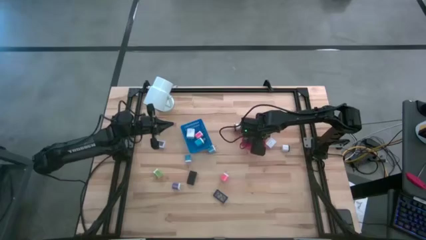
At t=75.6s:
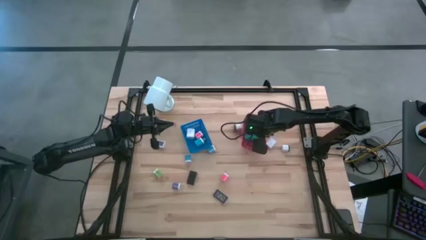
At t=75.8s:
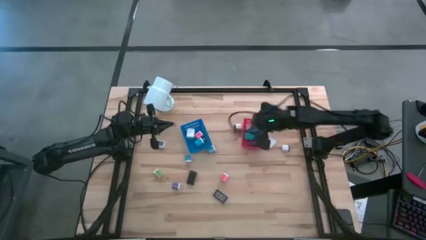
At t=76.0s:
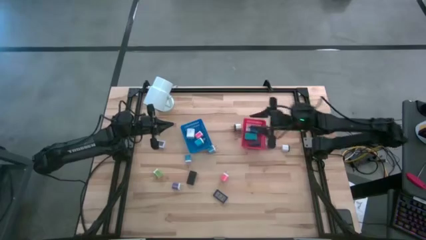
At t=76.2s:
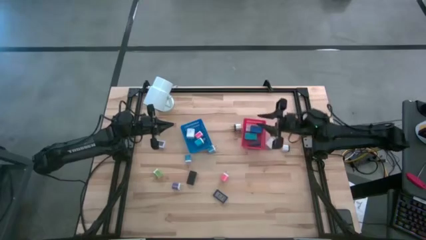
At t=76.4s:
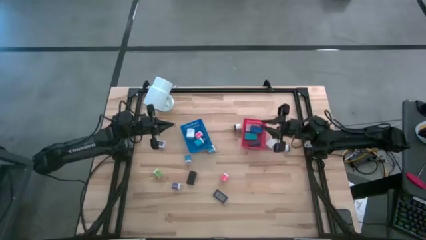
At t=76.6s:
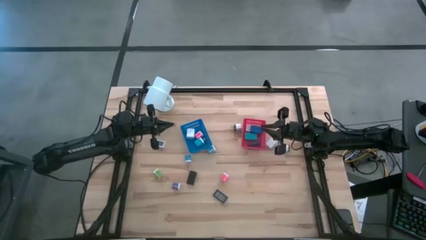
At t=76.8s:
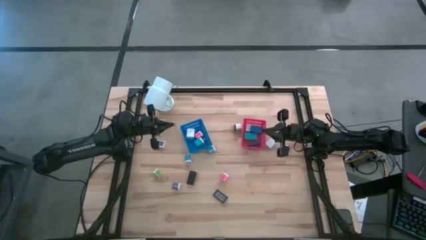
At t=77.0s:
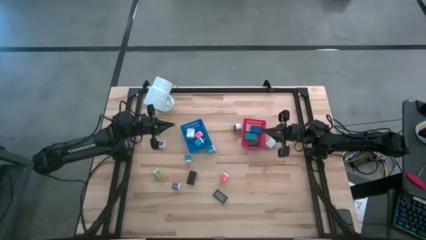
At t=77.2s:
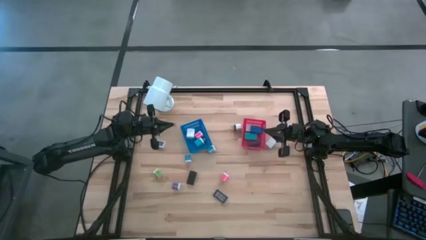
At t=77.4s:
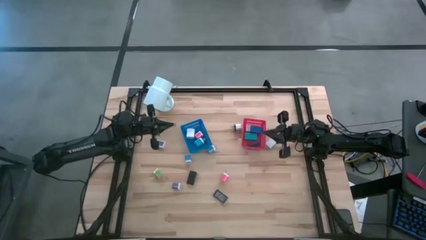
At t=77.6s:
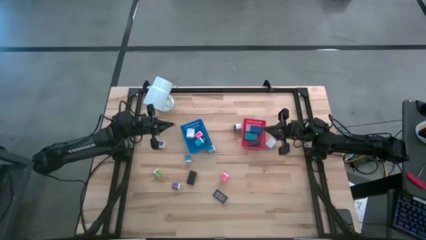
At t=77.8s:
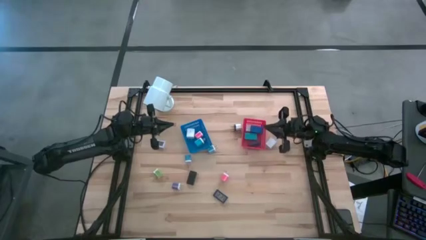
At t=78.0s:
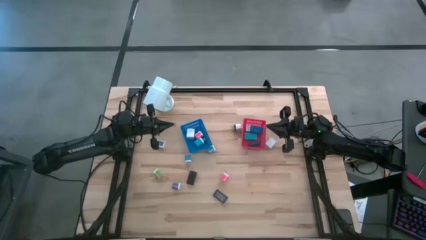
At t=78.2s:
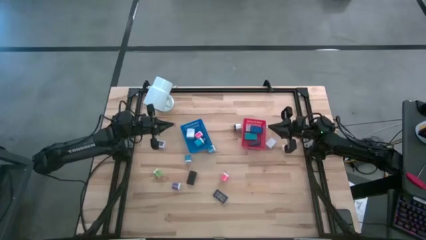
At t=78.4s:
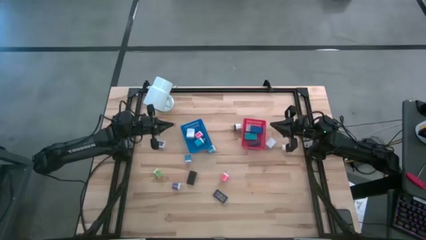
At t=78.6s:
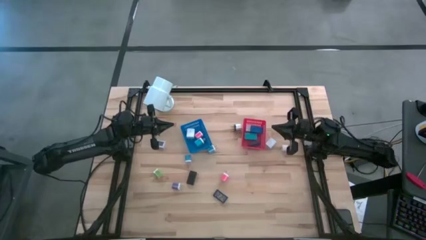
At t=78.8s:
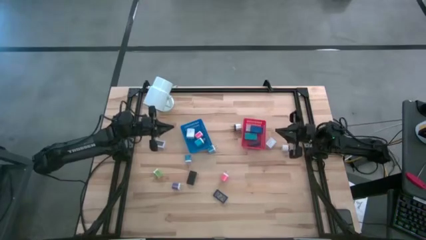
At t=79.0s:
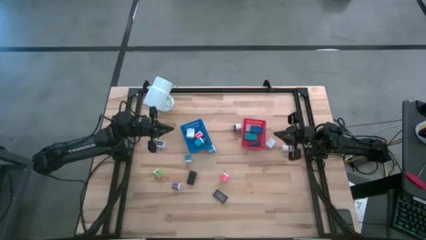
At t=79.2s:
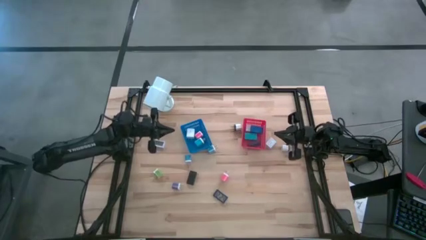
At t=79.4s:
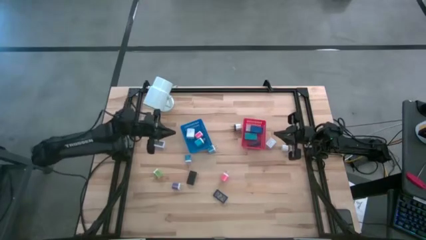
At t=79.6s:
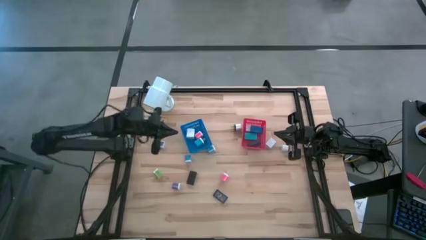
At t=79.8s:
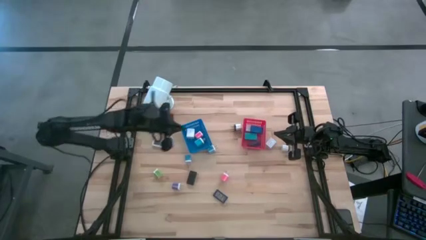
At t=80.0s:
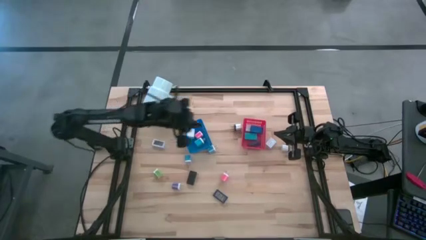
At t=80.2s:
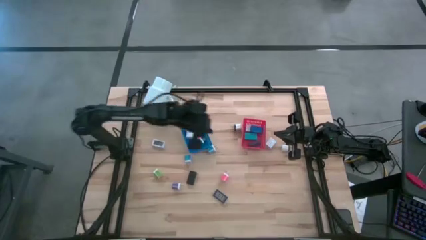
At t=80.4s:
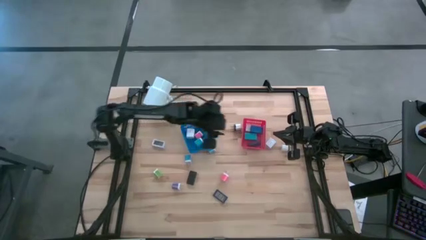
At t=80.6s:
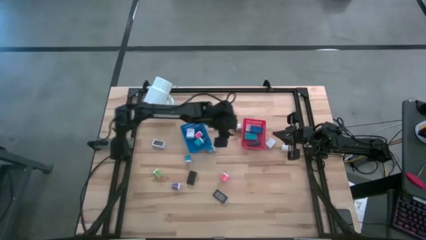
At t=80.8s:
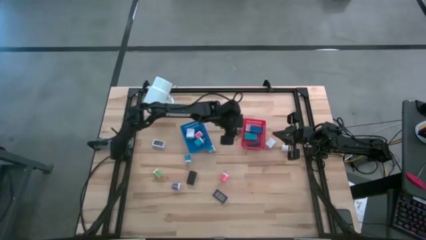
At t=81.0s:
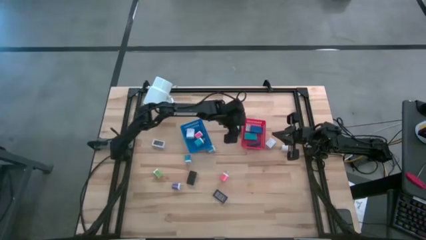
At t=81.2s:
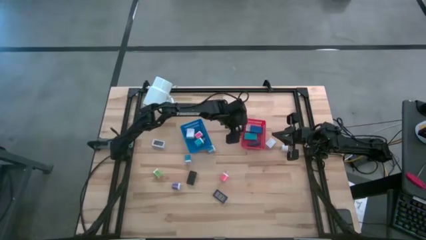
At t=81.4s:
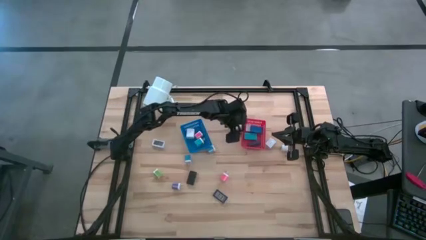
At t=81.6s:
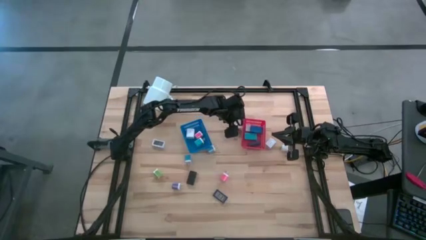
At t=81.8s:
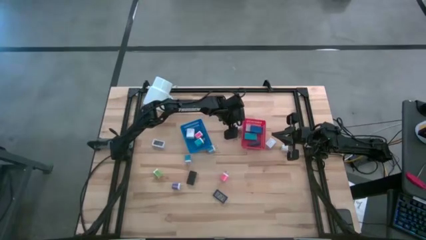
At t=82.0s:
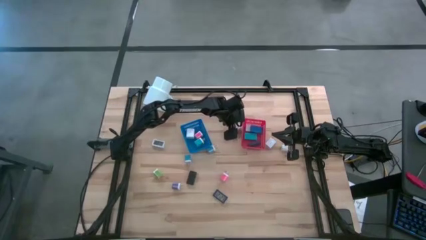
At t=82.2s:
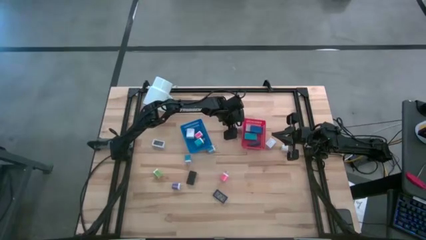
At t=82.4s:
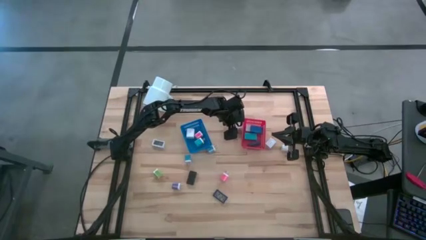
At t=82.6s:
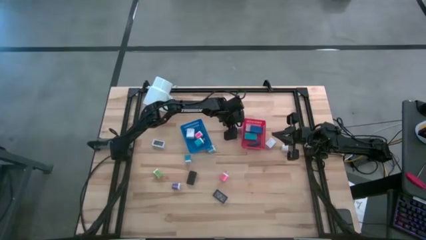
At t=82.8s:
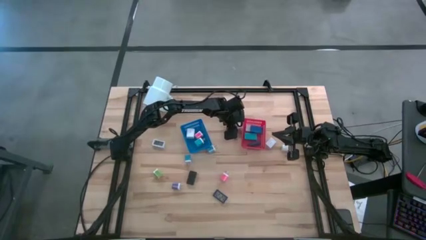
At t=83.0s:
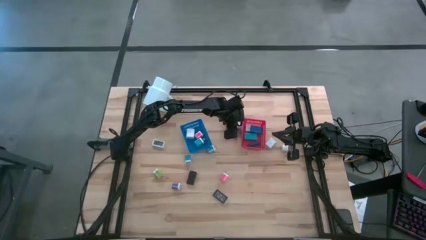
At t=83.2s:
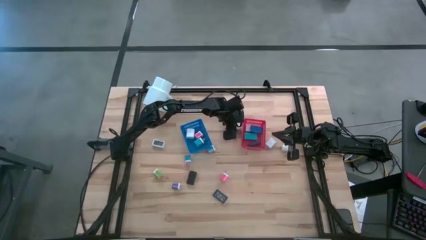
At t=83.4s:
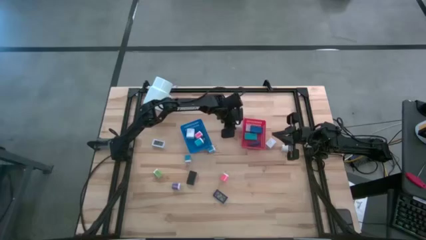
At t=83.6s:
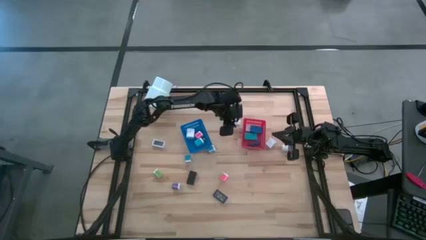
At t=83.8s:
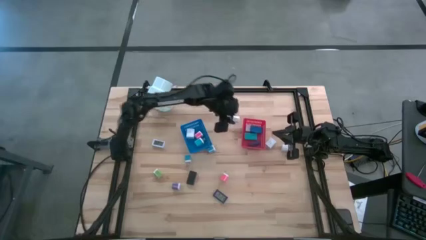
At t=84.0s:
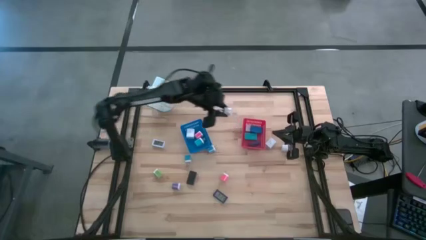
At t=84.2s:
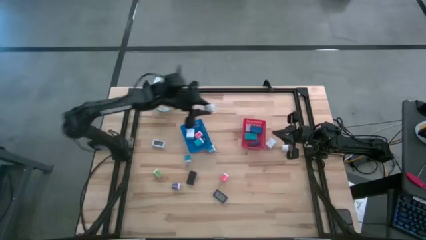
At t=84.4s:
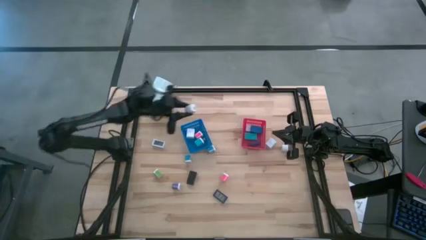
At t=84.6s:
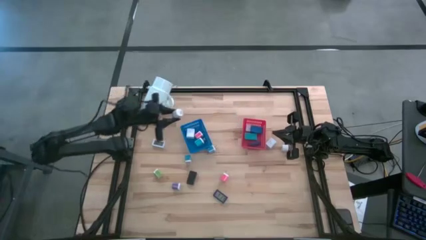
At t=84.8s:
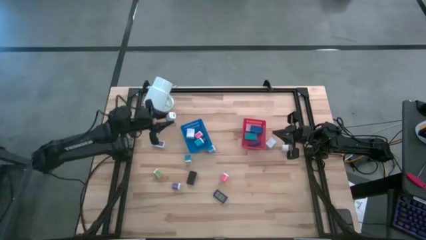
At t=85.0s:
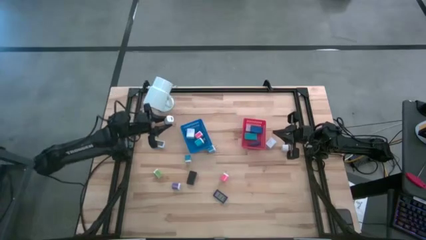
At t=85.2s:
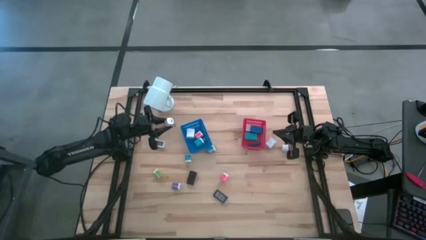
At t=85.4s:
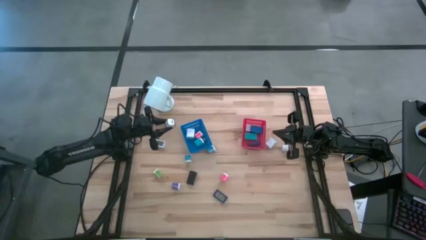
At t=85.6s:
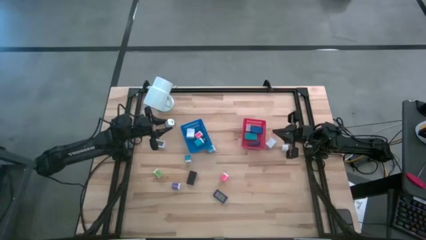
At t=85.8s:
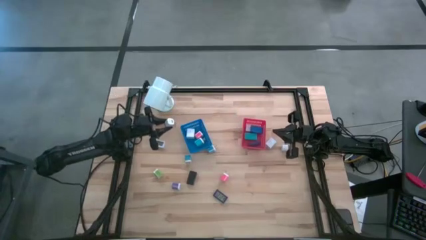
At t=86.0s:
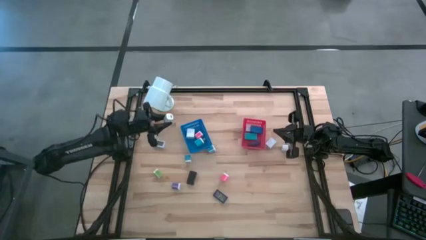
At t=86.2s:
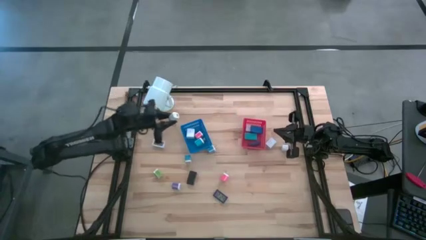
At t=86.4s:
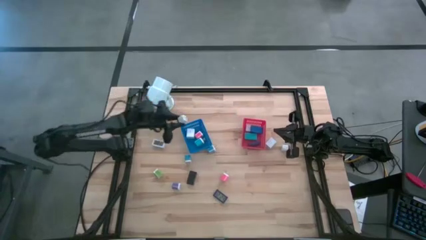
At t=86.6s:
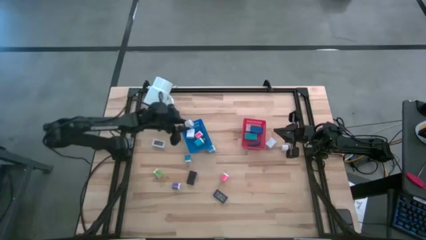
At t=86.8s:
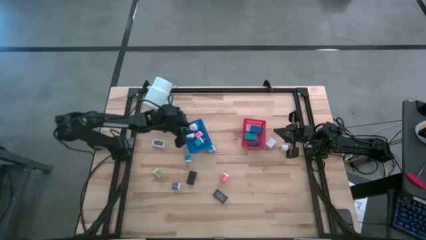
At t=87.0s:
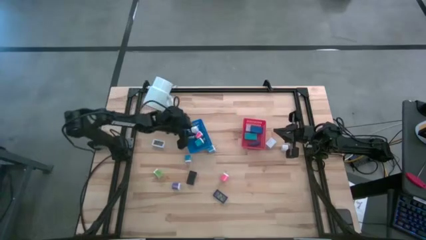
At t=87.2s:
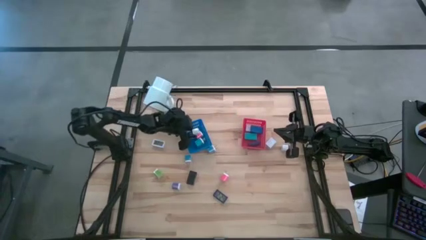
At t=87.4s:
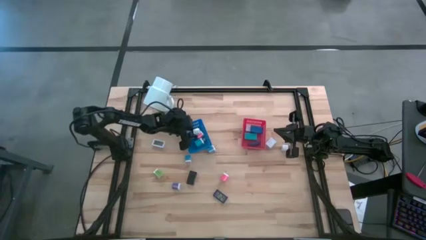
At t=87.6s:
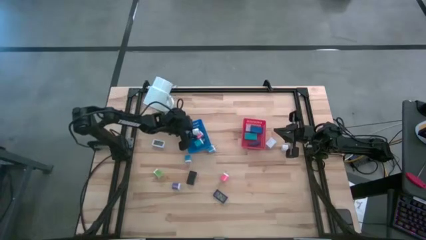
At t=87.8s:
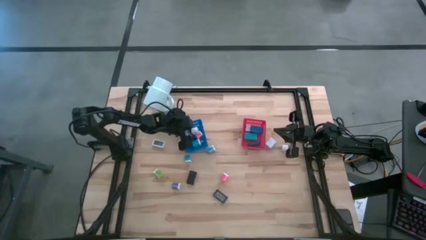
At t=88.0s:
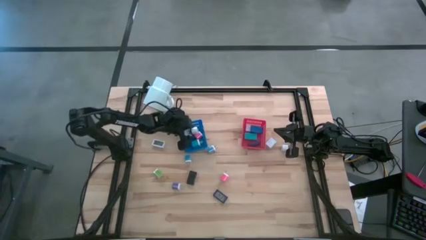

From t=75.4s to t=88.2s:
Task: Pick & Place Office items
Put the top black and white charger adapter into the blue bin
